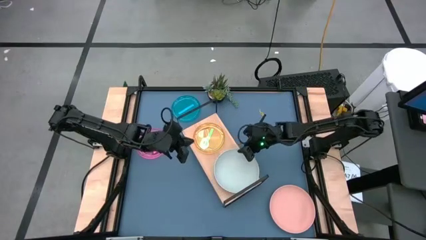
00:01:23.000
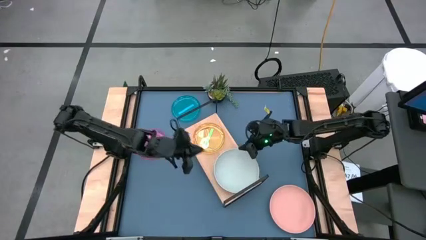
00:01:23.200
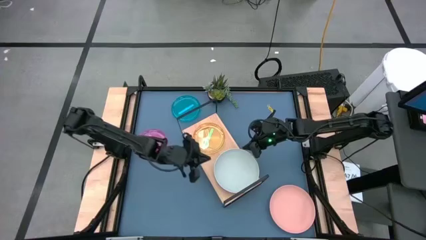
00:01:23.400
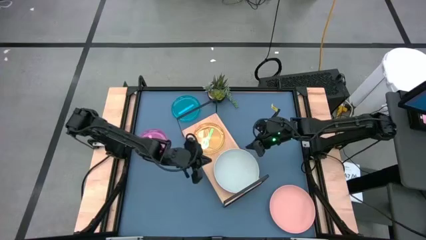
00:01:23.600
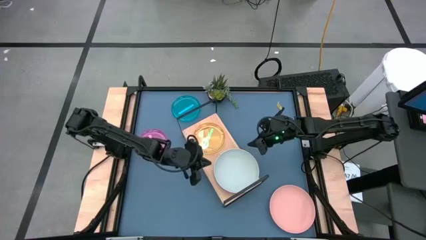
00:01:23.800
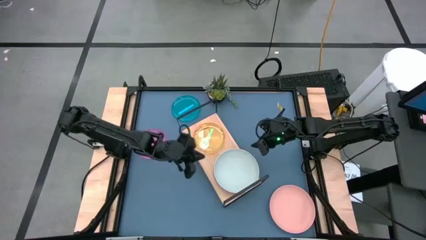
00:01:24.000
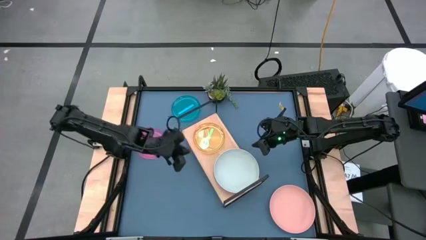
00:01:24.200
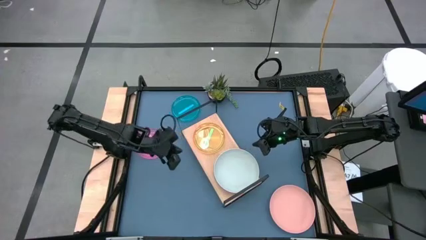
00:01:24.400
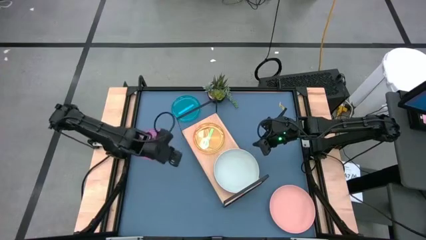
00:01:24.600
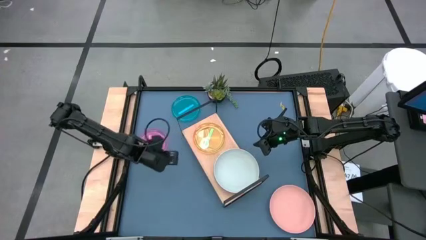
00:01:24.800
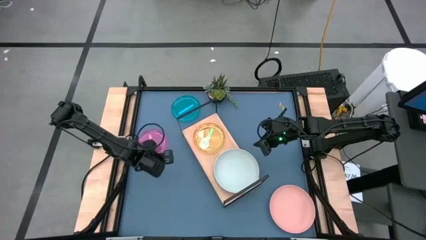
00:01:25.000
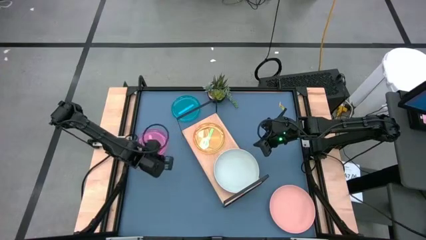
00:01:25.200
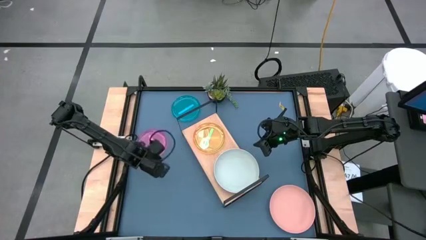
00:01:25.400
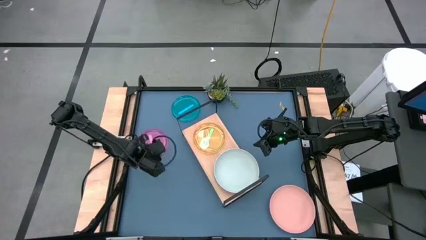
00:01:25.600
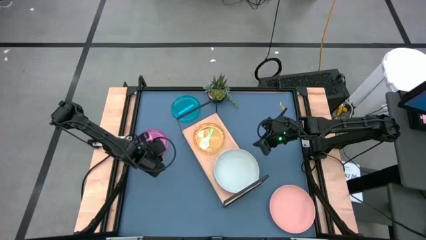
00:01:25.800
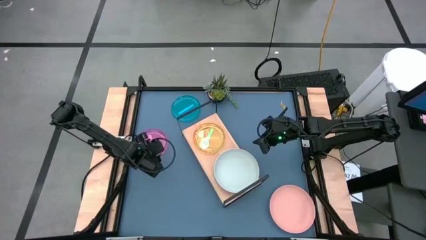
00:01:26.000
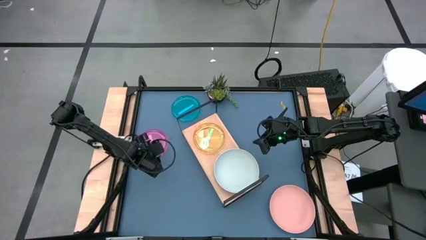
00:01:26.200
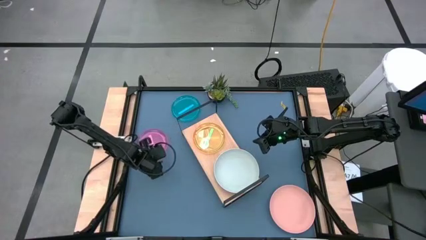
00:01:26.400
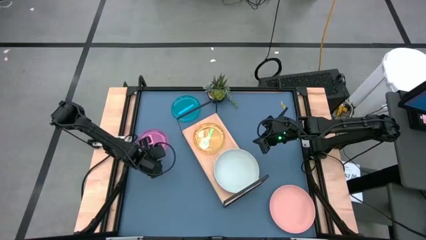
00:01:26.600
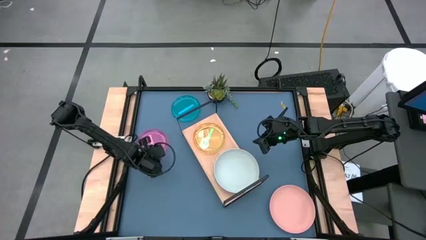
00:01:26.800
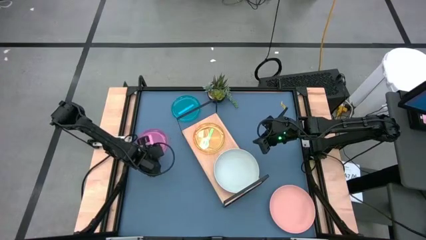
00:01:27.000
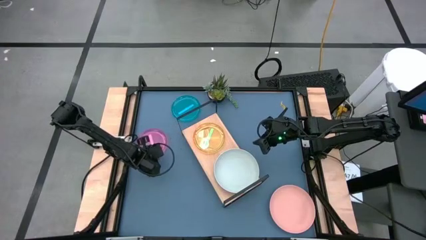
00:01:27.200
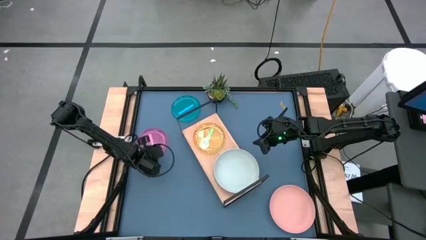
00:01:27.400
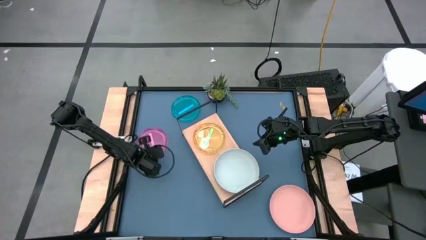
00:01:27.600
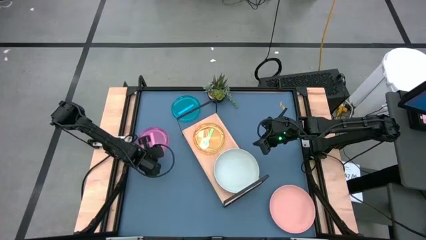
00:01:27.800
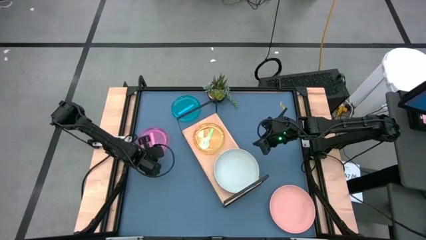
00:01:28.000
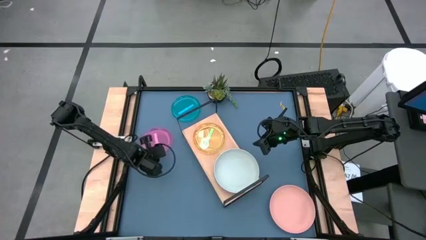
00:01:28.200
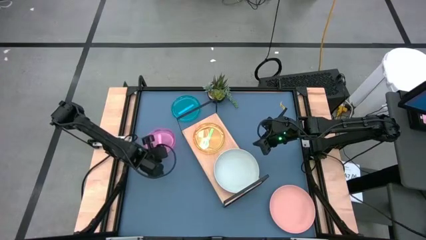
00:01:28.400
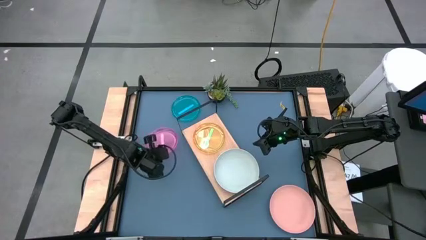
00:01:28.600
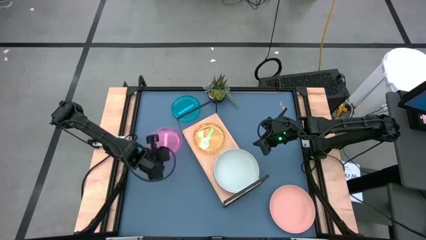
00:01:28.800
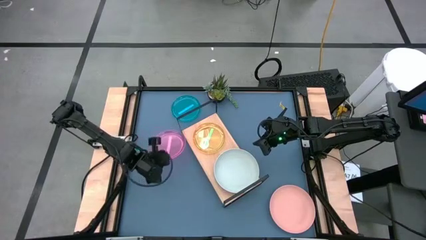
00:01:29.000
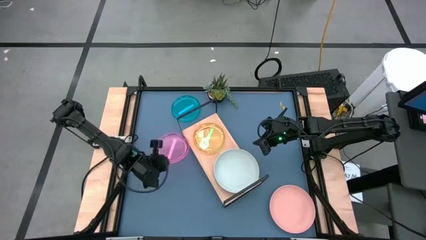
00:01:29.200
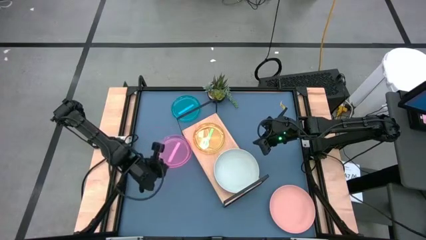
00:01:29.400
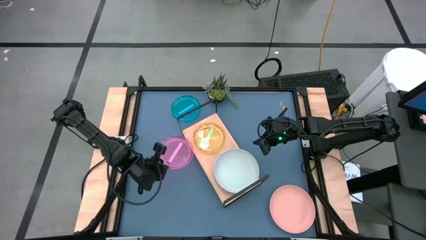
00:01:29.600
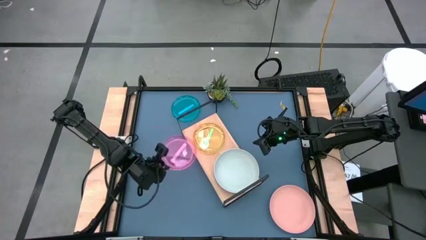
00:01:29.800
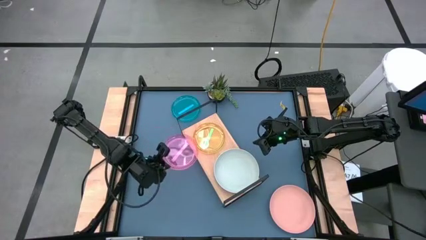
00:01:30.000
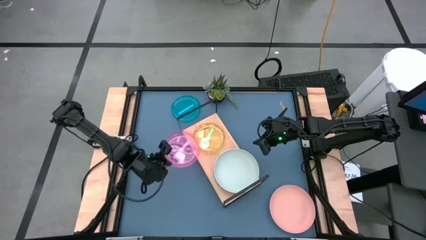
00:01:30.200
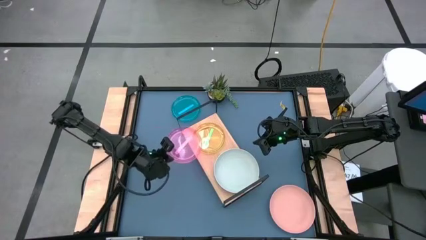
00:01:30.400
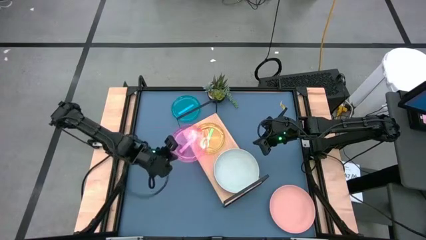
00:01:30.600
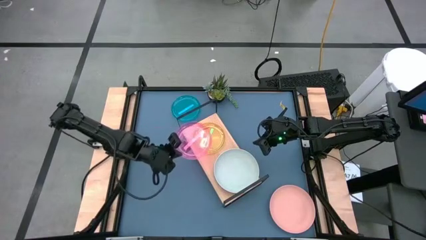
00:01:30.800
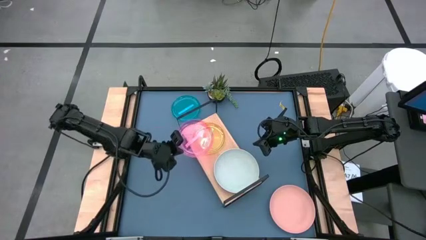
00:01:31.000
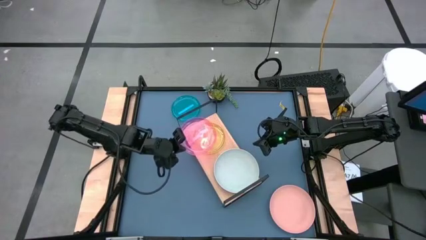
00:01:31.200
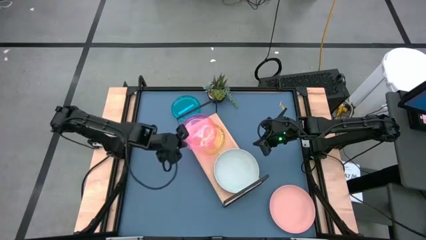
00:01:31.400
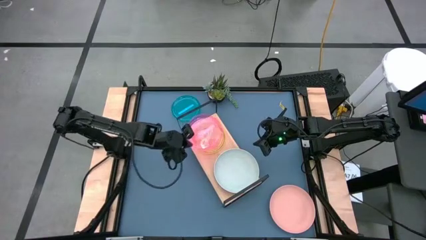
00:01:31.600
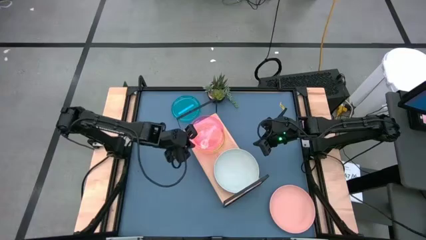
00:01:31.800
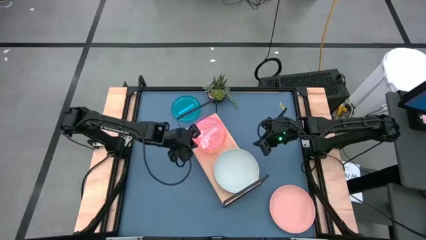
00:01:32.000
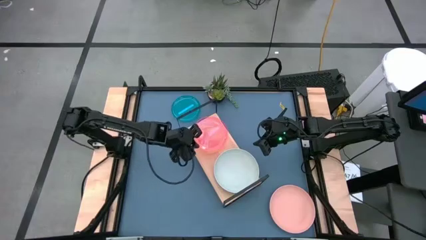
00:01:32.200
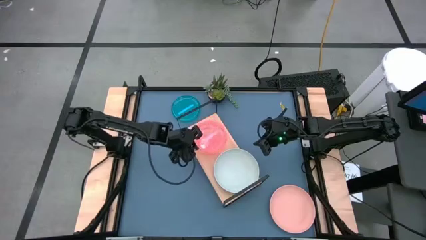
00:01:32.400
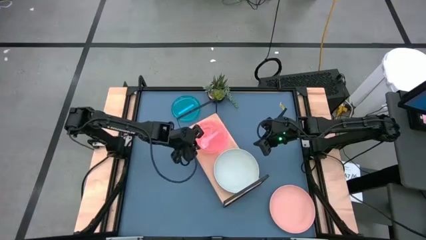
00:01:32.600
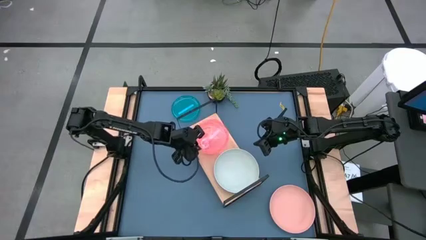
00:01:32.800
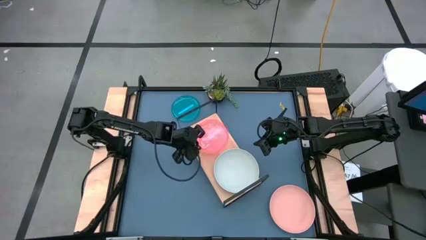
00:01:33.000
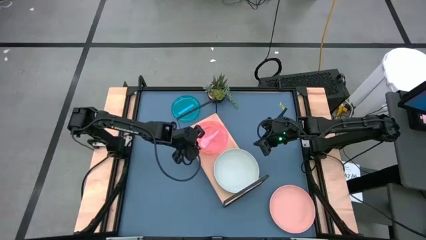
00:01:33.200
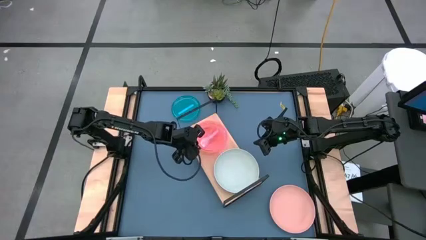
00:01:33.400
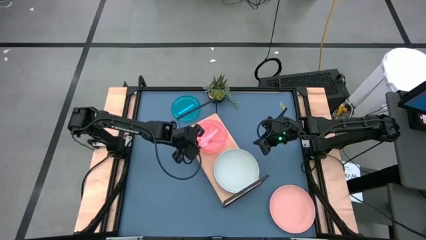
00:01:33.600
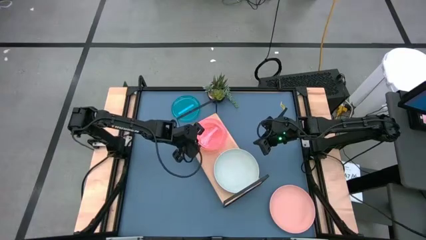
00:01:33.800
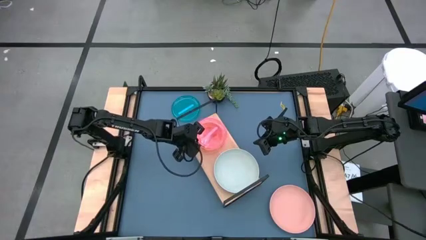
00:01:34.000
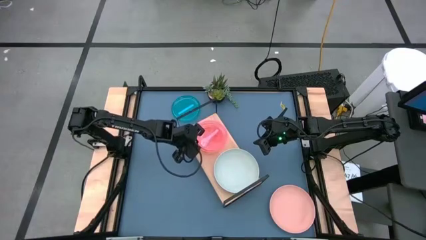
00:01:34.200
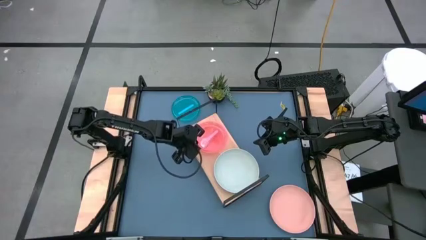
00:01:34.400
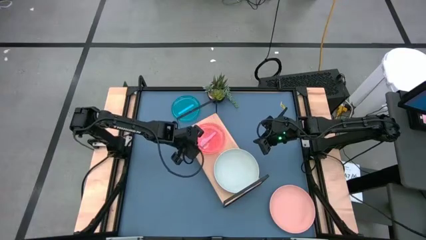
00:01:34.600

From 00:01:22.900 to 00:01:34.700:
Task: Place and stack plates onto a shelf
Stack the small pink plate on the small green plate on the shelf

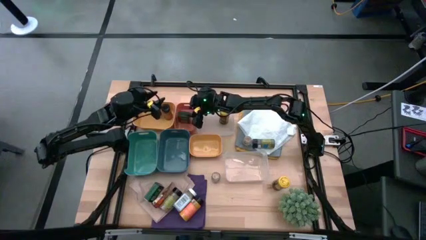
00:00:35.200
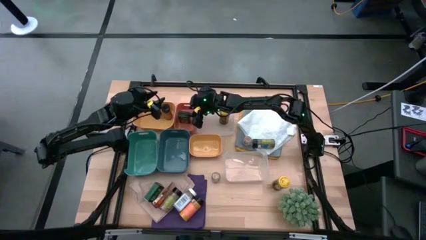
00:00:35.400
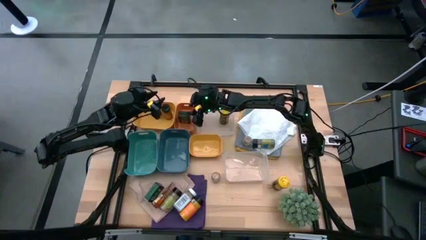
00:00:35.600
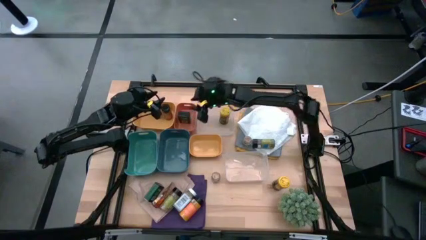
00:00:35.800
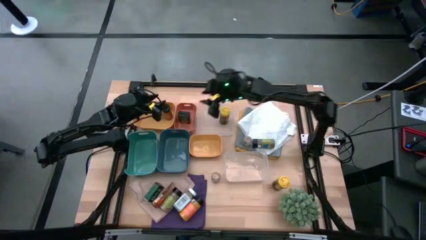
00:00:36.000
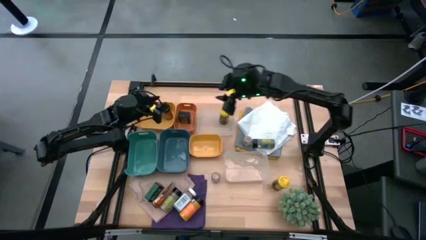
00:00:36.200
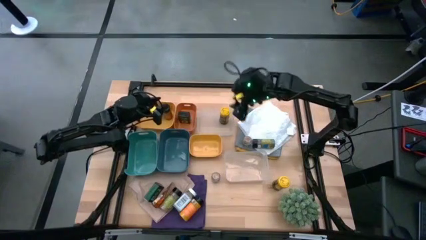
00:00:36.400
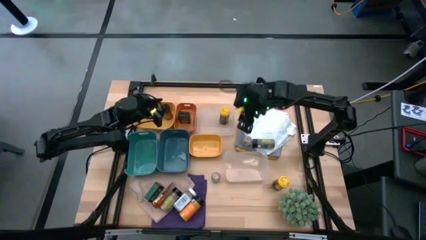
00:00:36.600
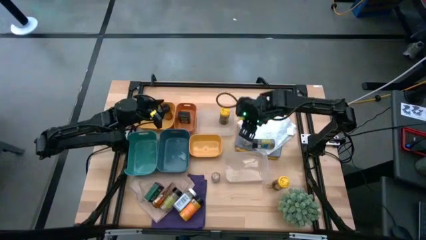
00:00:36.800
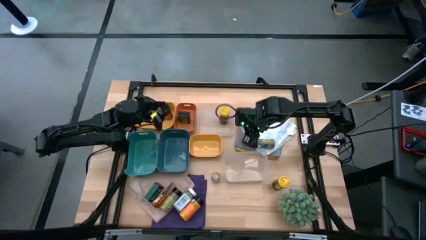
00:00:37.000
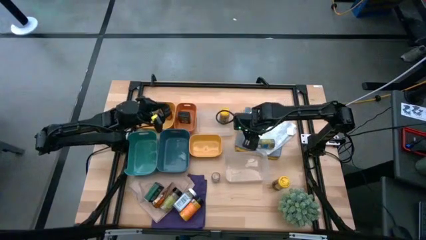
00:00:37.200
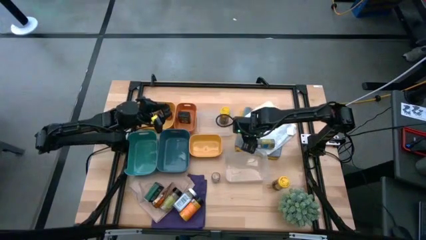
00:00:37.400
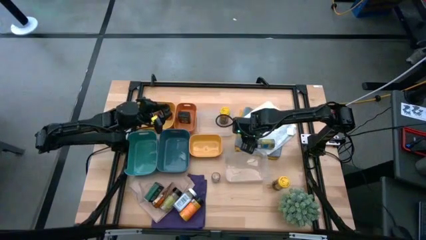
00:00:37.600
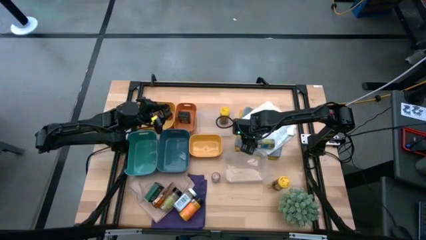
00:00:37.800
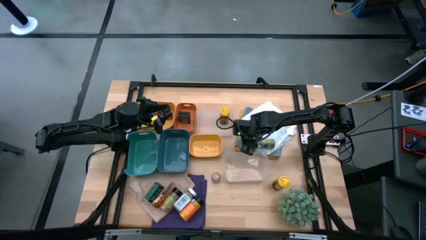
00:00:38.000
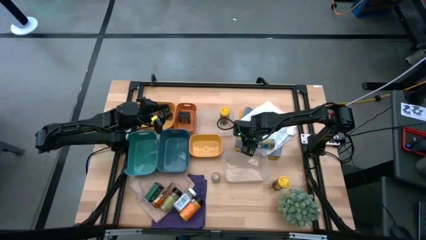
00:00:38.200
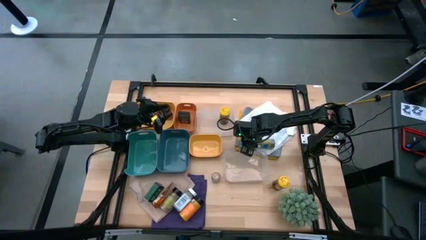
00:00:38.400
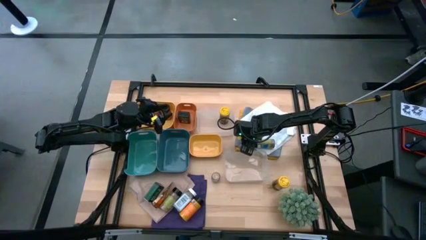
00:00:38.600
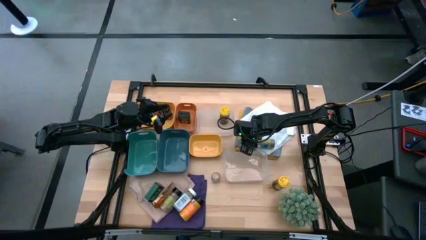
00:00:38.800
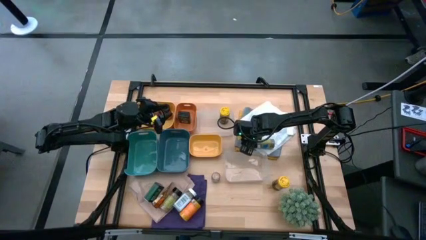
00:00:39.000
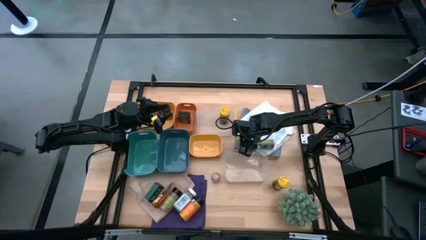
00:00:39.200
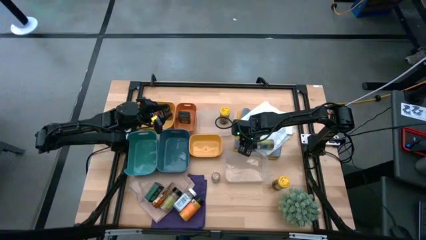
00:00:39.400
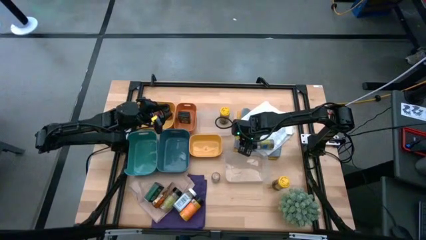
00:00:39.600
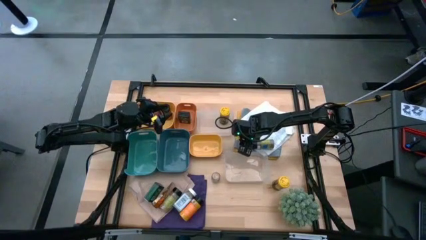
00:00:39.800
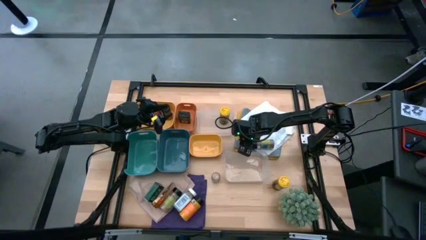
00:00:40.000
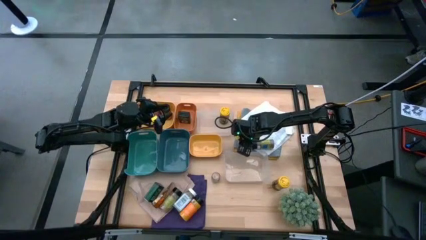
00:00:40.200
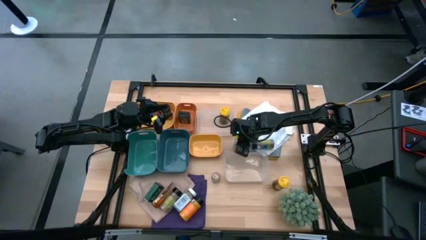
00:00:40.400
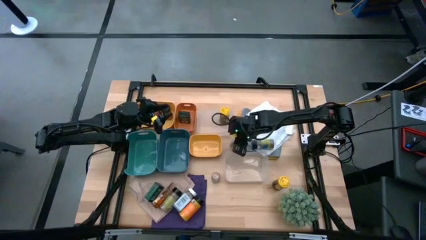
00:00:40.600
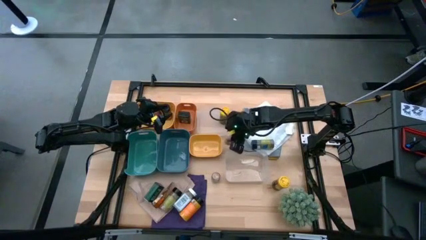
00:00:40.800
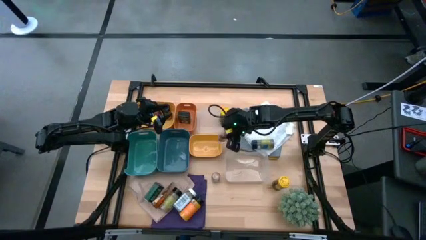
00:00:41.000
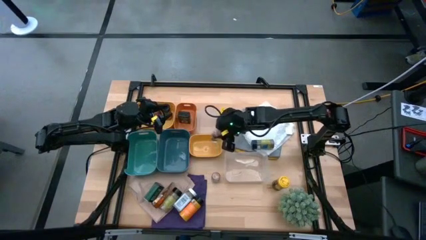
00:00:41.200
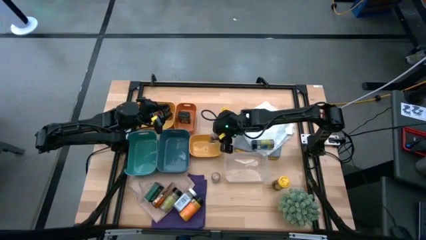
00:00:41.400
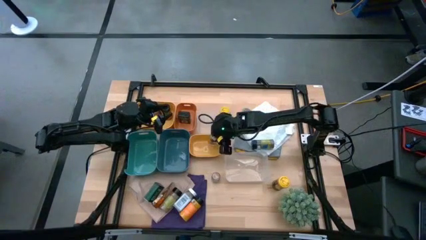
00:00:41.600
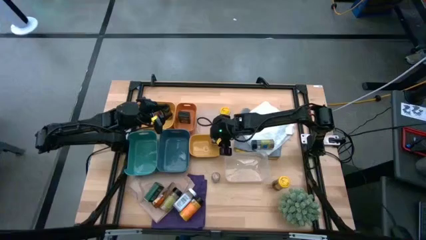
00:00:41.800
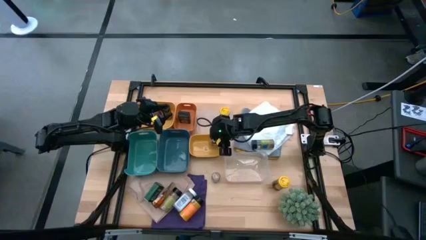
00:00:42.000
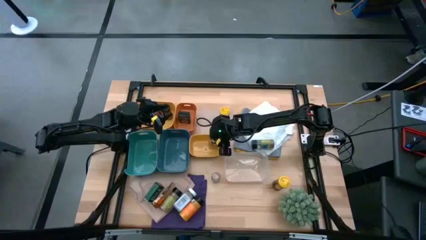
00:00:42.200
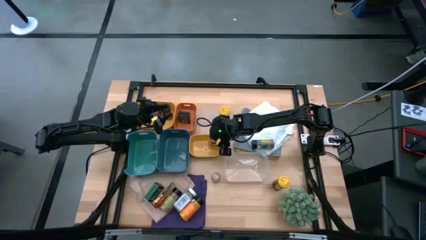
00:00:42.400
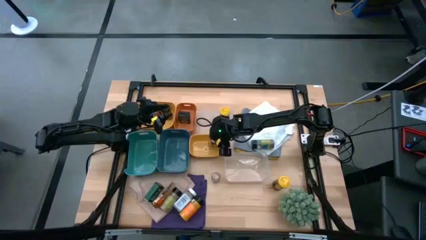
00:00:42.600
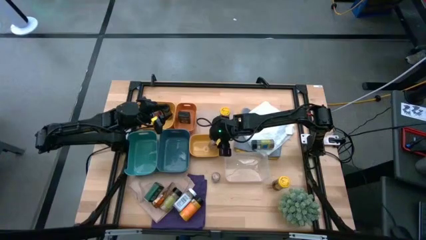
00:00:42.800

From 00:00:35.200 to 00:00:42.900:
Task: Sort spices by type
Put the top brown spice bottle into the bottom yellow bin
